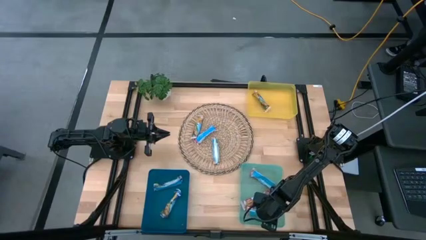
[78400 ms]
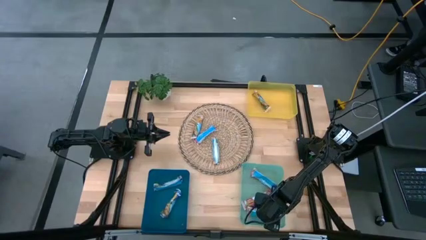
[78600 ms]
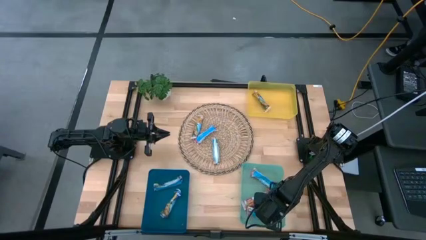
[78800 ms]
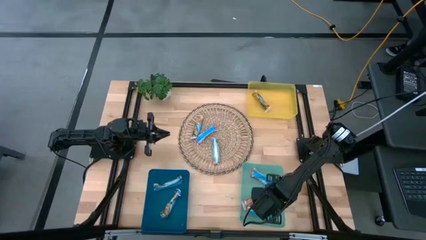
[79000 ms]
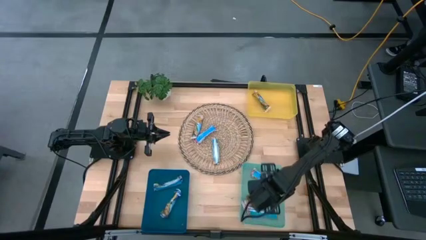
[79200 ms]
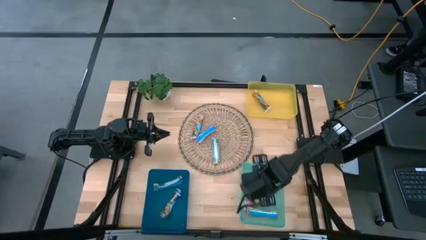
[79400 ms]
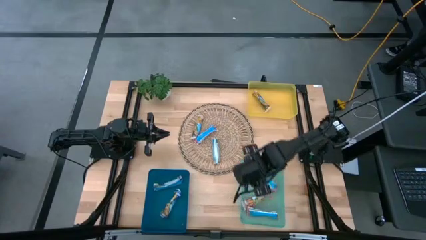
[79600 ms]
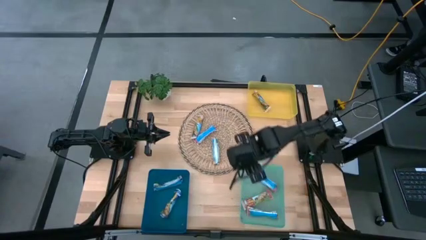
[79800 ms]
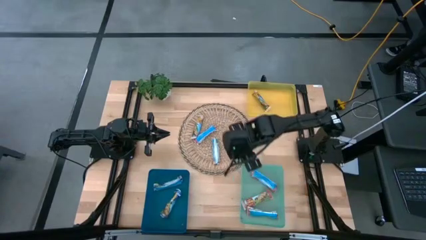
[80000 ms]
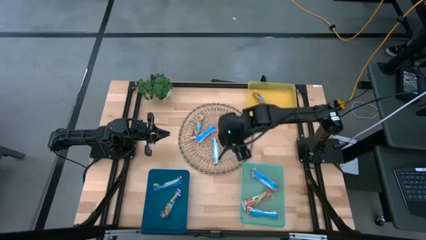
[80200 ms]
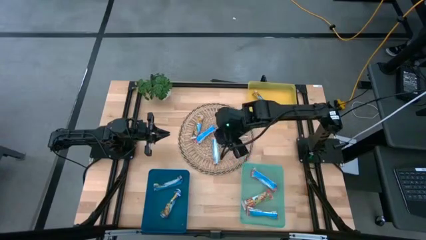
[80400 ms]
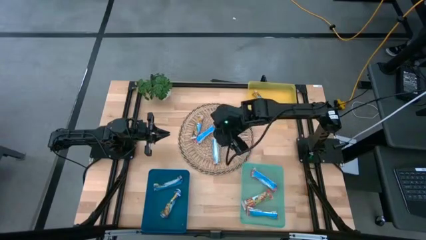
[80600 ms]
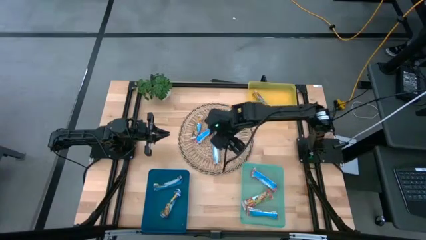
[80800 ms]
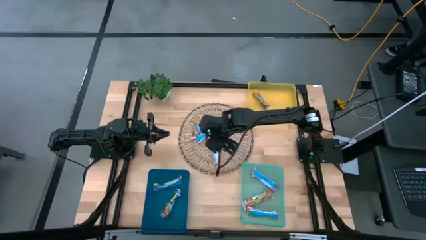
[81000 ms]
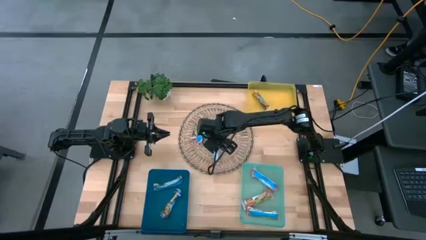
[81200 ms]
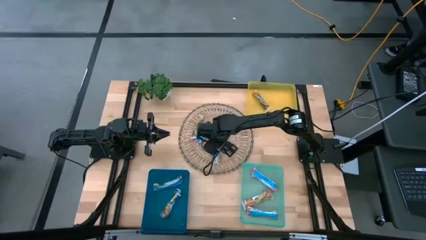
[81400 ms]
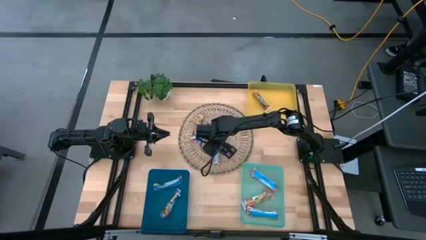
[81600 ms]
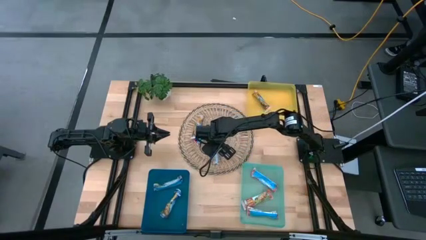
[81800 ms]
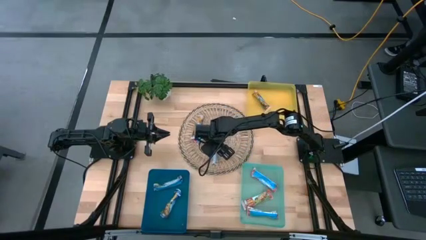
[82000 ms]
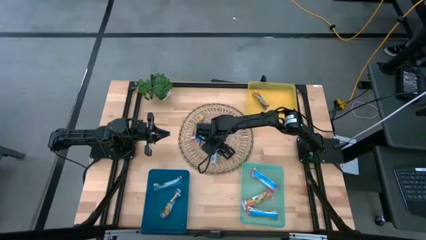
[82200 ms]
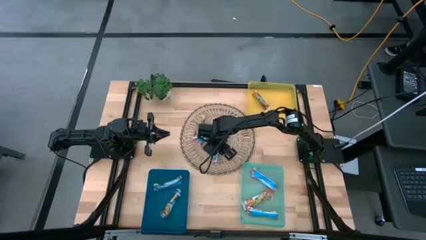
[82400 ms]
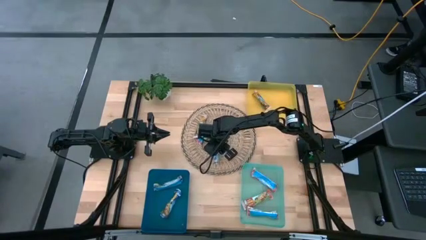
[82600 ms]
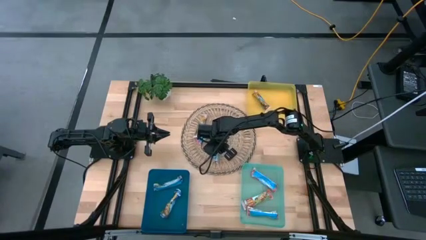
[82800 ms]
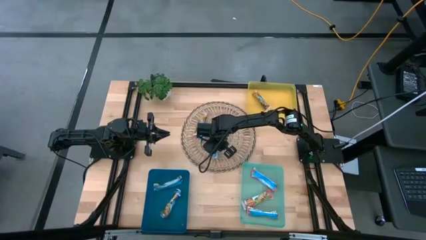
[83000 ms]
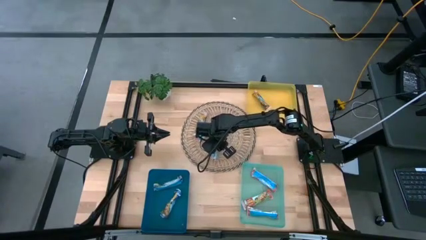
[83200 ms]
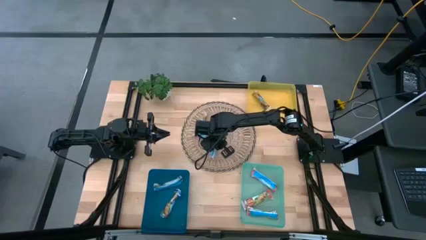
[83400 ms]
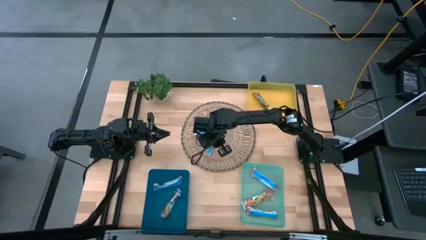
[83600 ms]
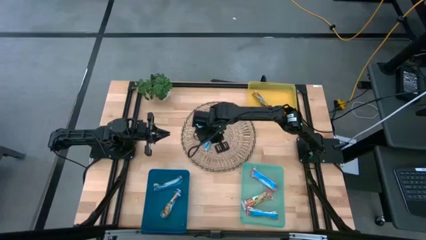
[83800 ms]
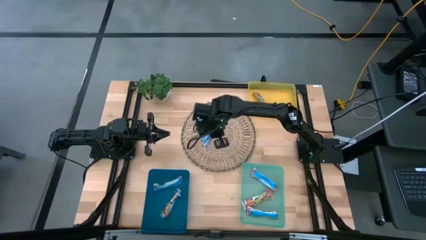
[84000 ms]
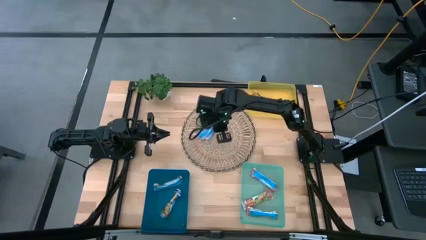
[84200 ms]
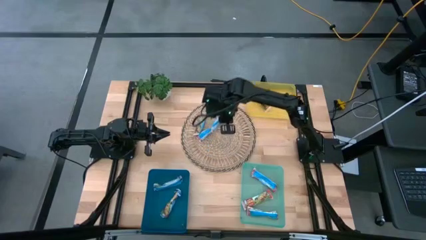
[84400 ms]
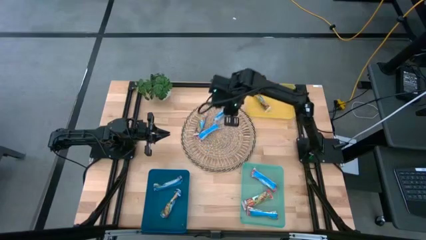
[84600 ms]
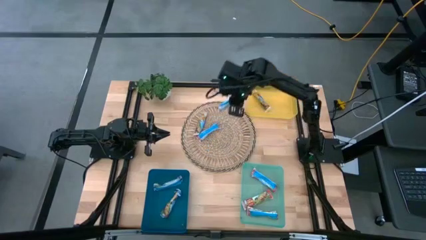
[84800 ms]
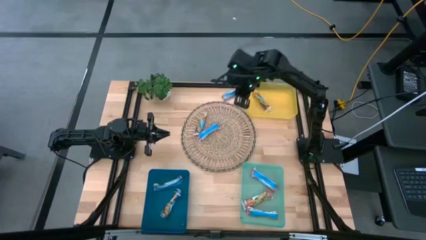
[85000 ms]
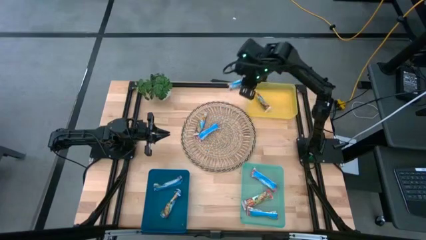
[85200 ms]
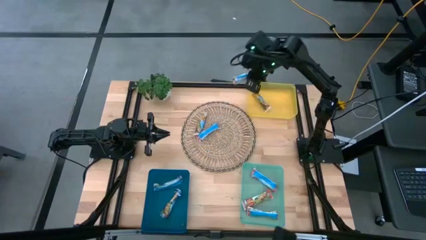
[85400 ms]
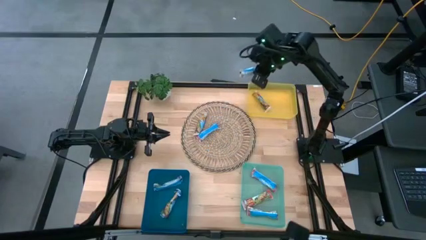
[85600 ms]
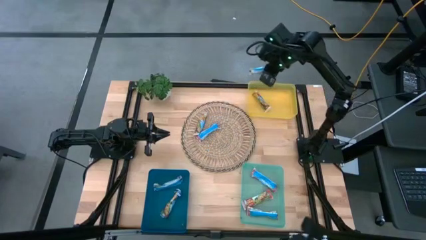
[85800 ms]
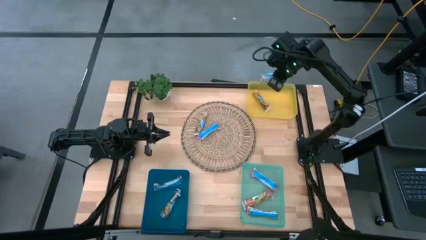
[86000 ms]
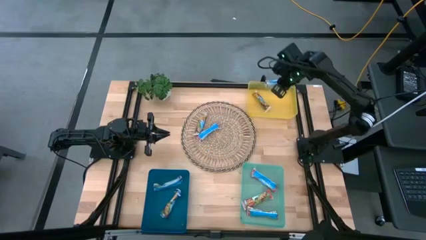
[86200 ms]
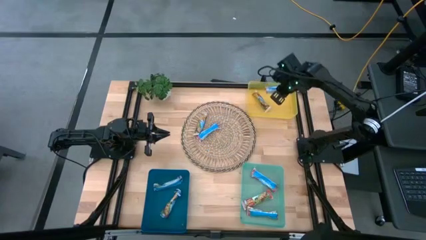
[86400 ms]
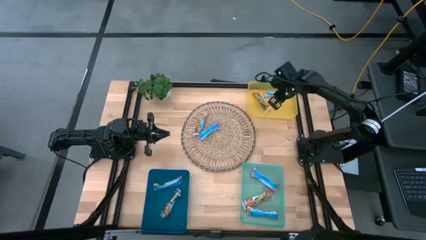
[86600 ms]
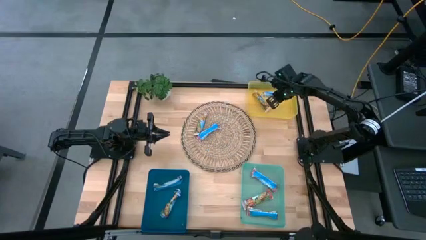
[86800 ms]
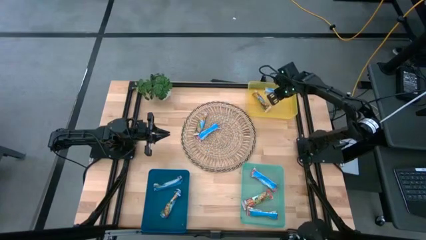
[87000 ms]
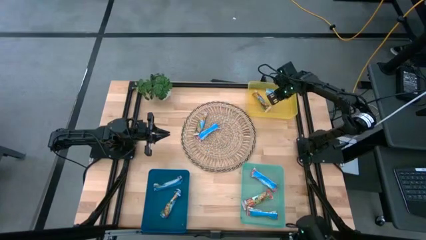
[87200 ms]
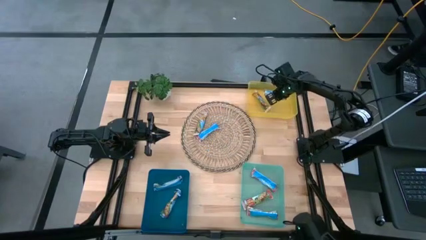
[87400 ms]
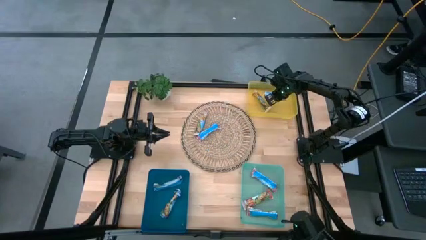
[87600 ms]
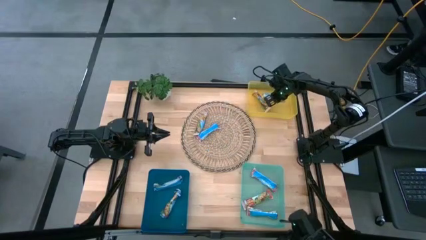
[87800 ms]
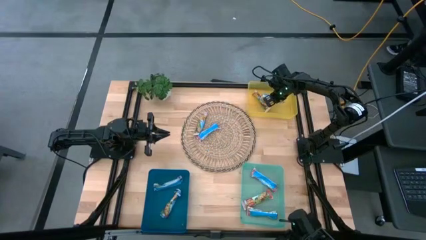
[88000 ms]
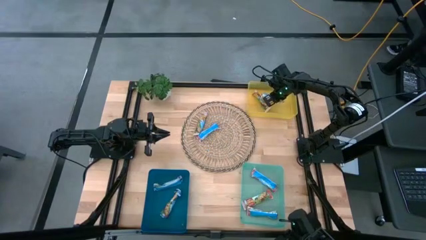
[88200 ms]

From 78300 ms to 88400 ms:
Task: Pick and place Granola Bars by type
Put the yellow granola bar into the yellow bin

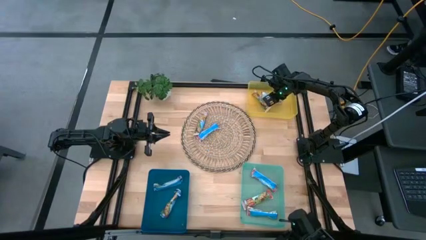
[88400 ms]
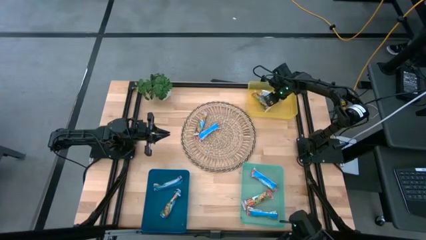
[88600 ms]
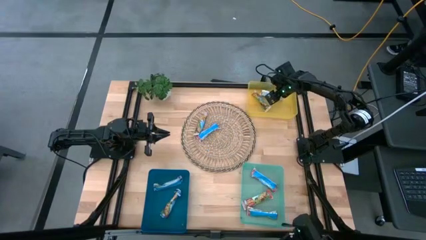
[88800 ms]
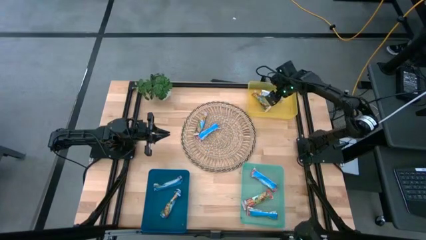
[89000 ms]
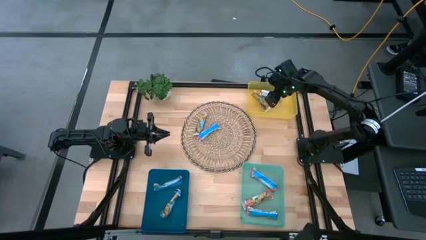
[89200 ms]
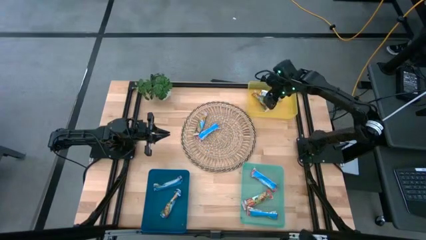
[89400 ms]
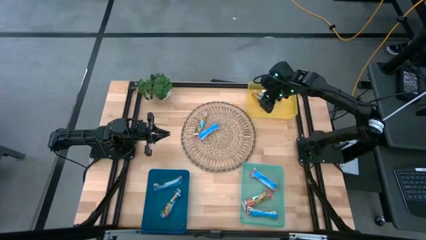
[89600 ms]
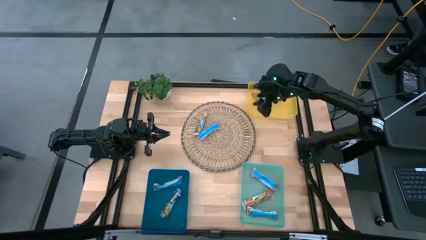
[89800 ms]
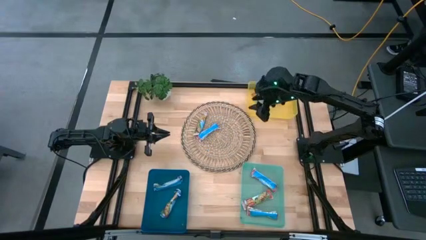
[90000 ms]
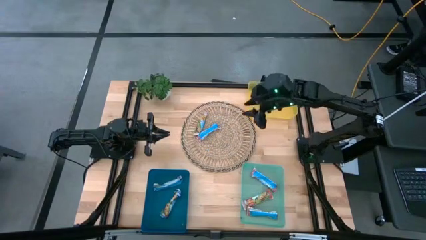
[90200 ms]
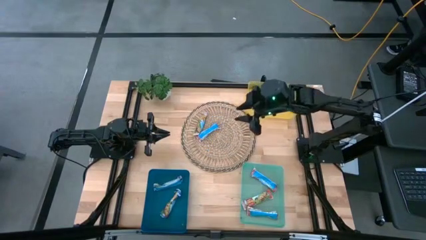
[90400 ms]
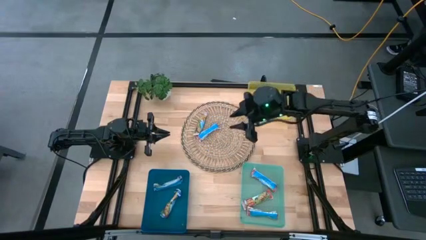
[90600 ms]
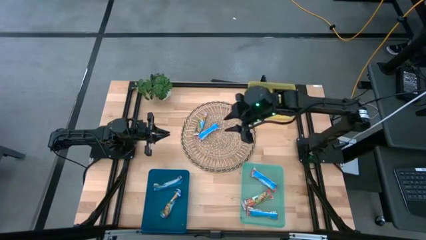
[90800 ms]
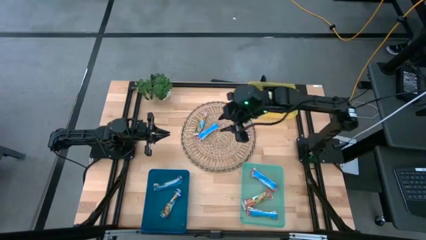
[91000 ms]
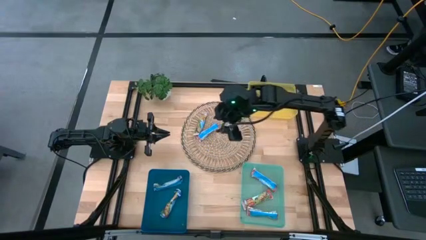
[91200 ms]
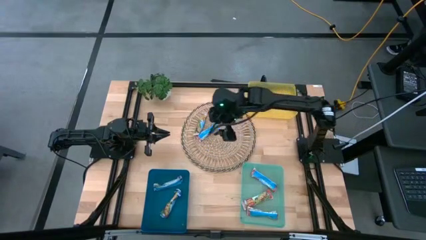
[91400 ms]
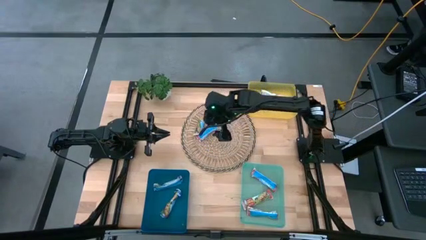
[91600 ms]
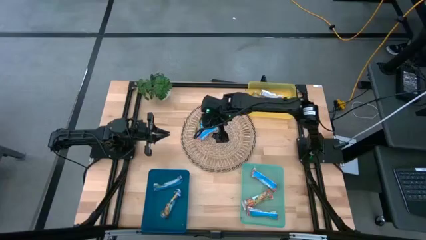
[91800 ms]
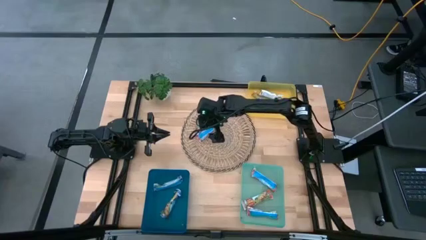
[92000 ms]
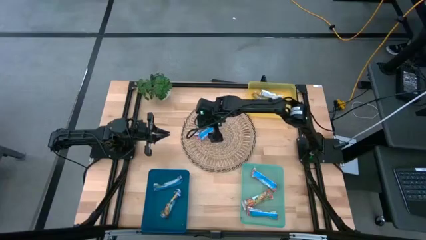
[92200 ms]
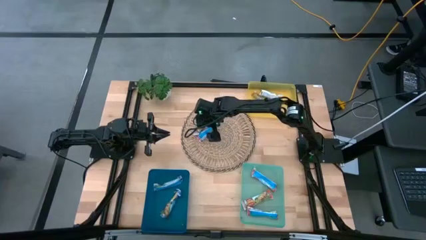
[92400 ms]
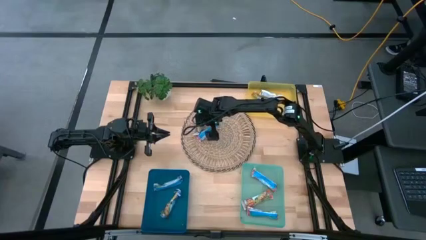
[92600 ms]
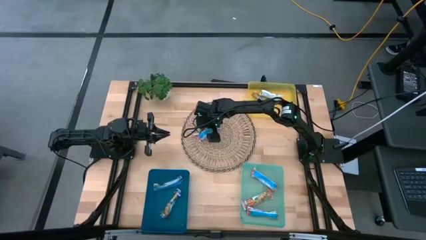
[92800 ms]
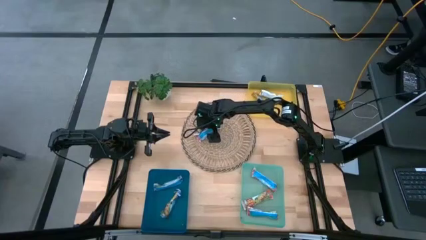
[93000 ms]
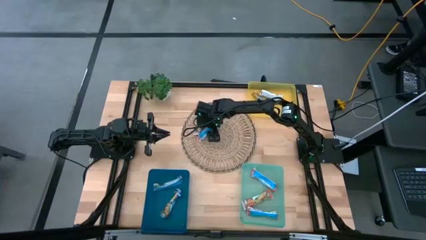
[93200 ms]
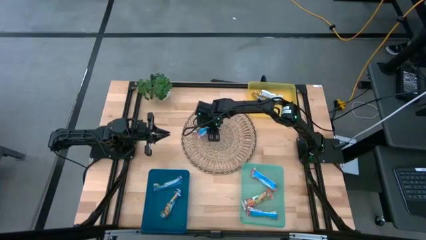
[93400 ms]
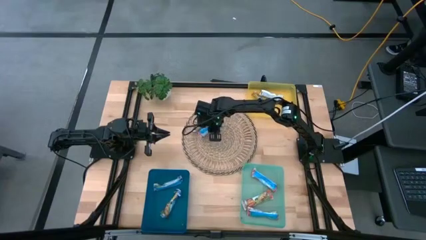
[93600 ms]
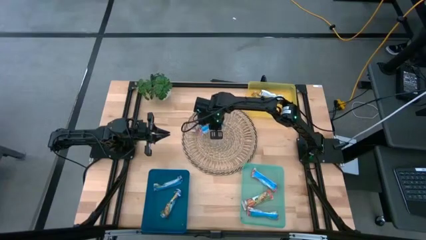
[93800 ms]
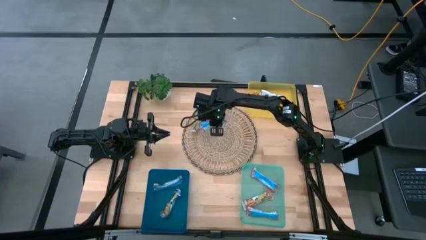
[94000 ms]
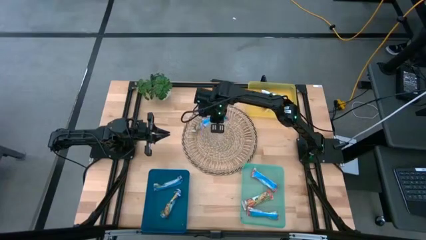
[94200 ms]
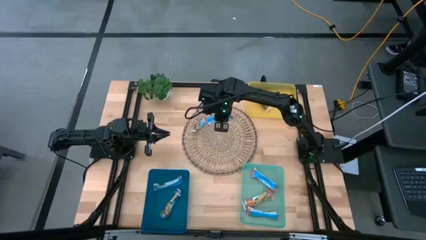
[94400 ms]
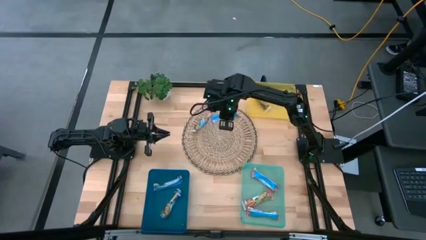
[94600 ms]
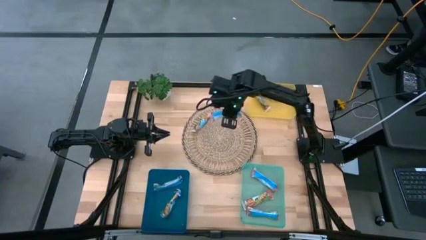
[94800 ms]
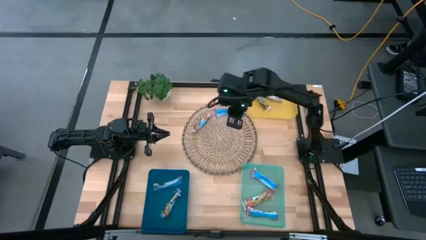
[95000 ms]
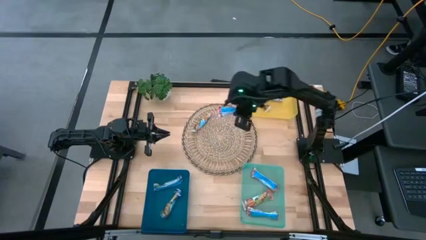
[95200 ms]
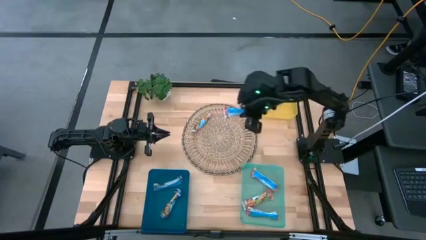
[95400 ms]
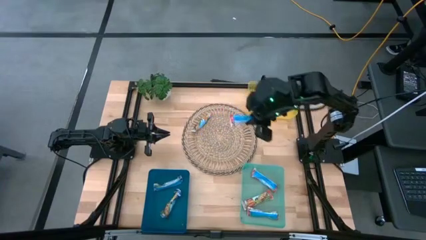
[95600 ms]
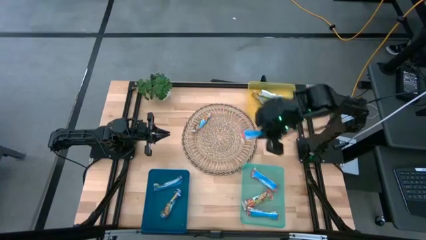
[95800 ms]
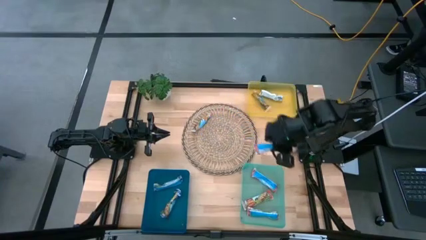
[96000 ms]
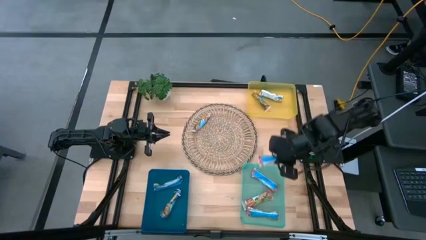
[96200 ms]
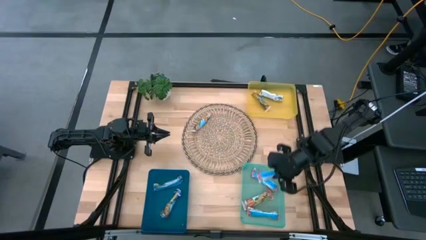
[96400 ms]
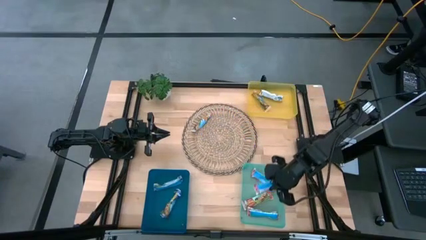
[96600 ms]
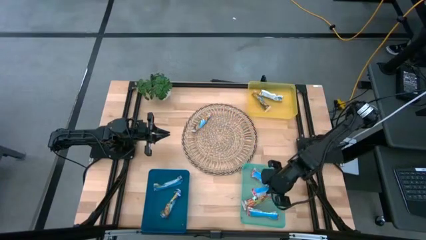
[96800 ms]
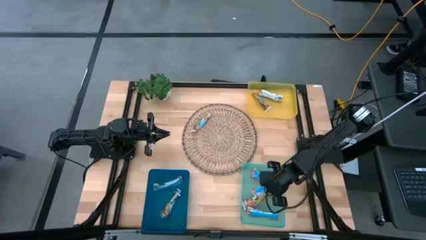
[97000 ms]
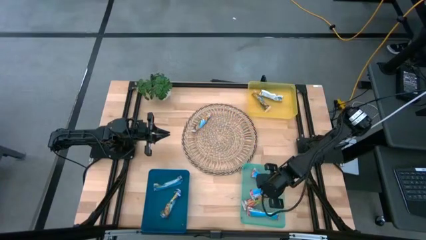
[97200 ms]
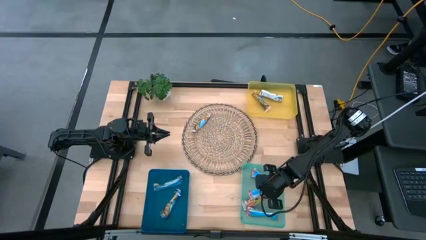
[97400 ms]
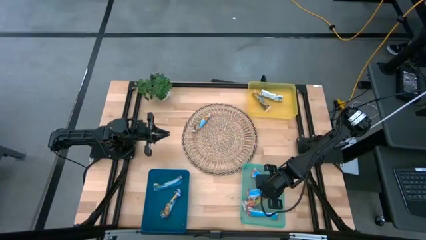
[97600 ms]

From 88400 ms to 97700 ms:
Put the red granola bar into the green bin
